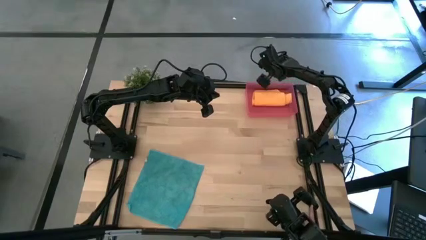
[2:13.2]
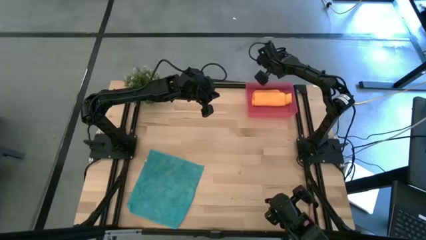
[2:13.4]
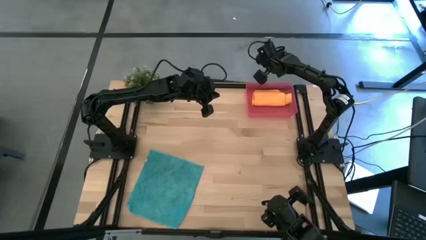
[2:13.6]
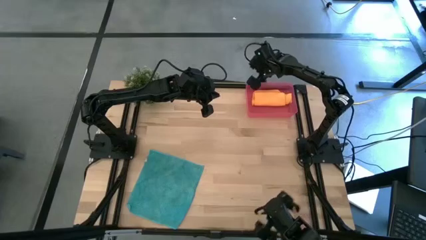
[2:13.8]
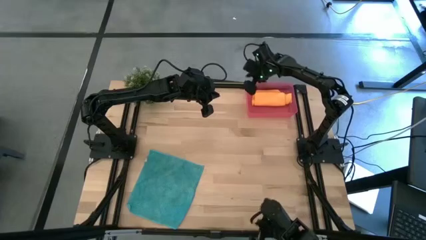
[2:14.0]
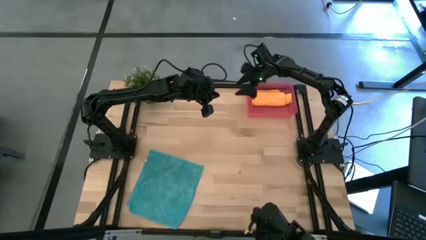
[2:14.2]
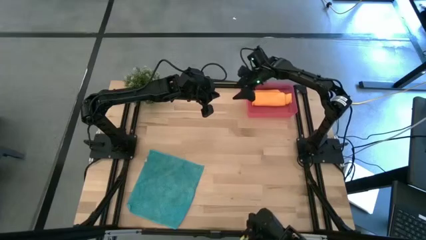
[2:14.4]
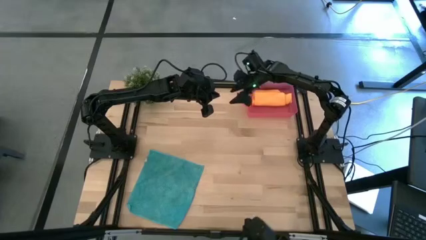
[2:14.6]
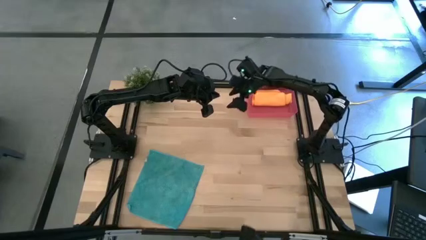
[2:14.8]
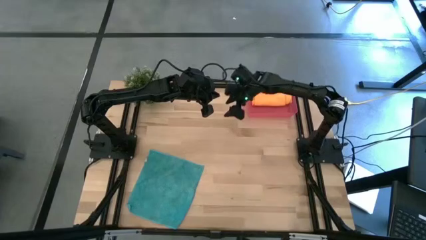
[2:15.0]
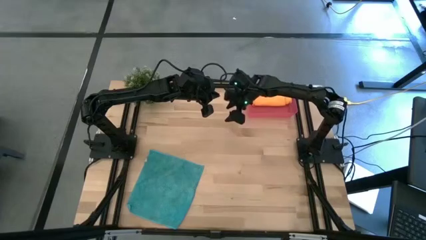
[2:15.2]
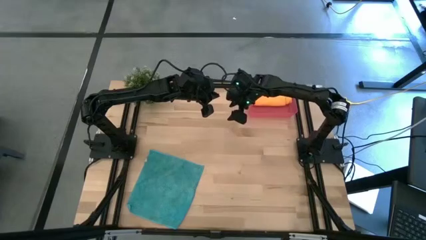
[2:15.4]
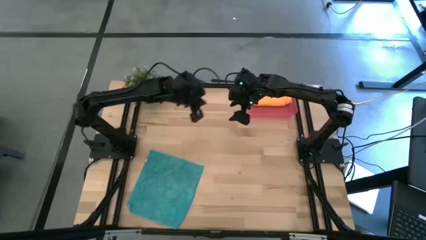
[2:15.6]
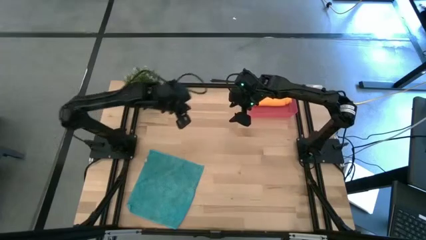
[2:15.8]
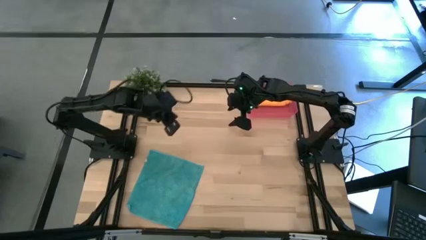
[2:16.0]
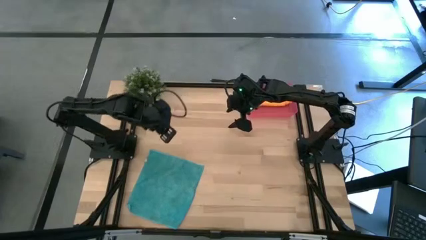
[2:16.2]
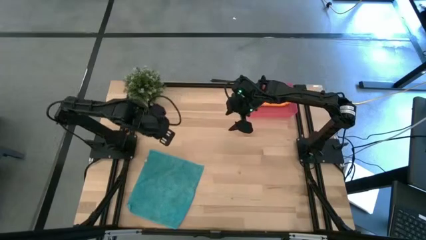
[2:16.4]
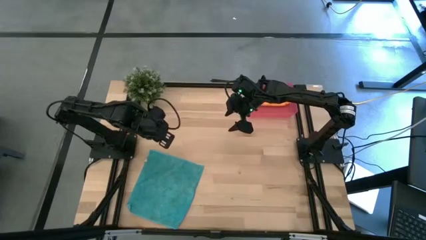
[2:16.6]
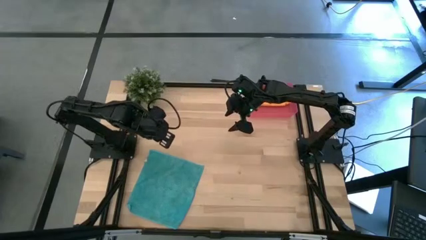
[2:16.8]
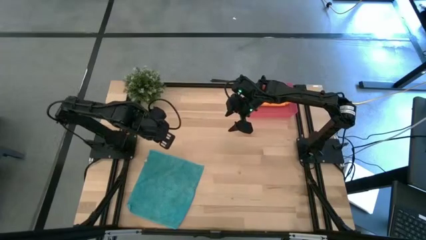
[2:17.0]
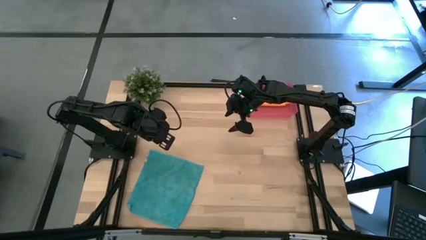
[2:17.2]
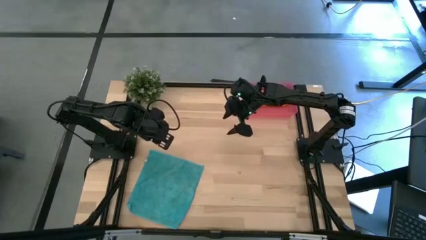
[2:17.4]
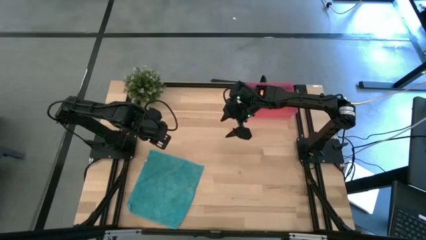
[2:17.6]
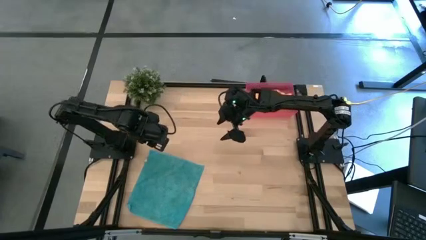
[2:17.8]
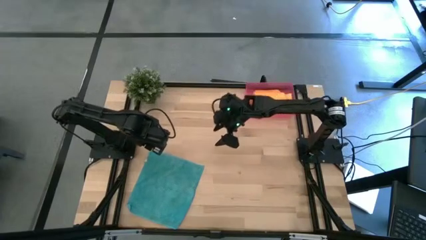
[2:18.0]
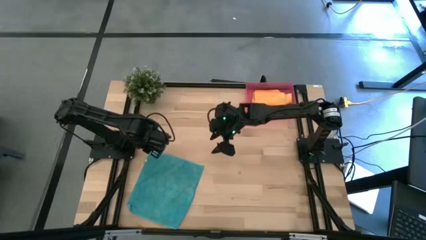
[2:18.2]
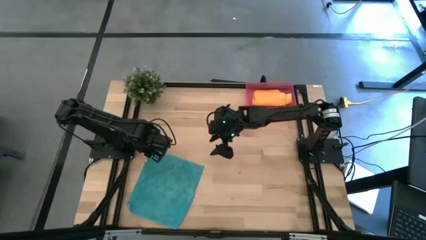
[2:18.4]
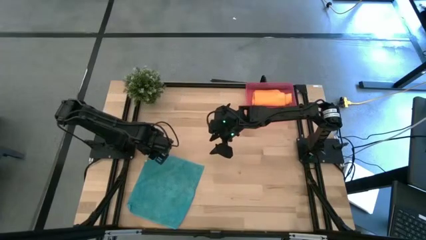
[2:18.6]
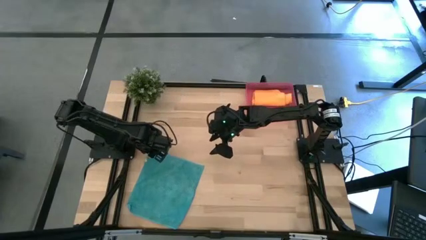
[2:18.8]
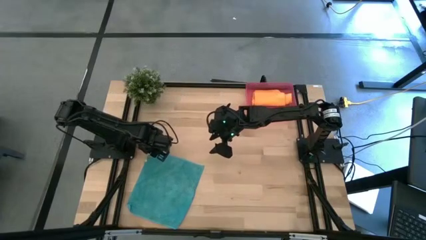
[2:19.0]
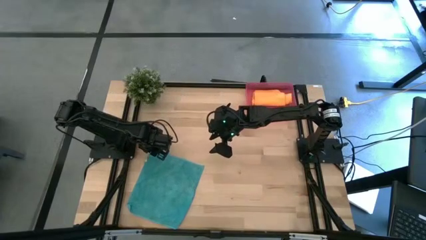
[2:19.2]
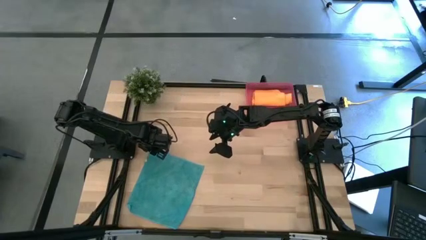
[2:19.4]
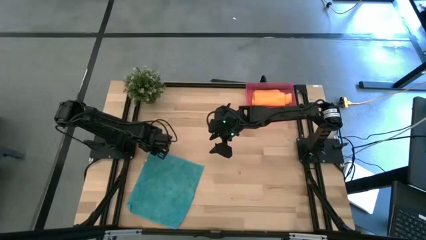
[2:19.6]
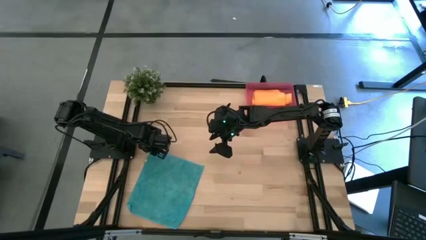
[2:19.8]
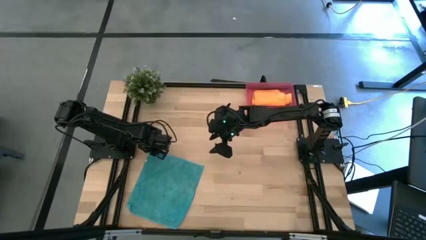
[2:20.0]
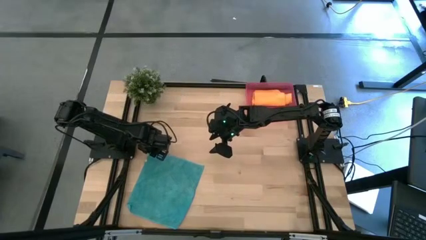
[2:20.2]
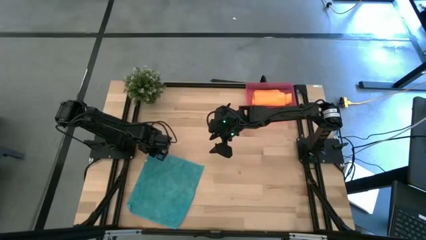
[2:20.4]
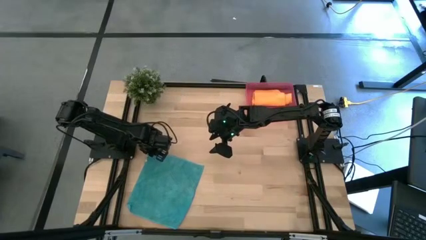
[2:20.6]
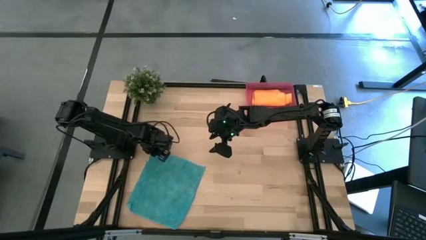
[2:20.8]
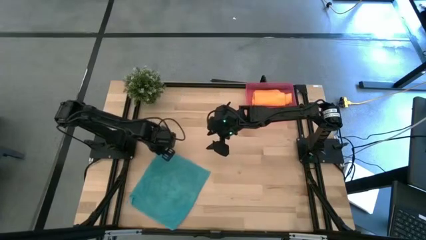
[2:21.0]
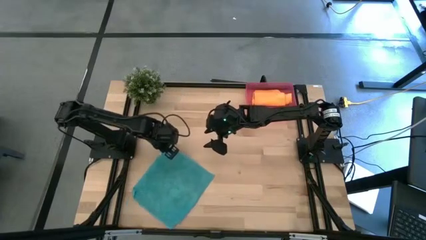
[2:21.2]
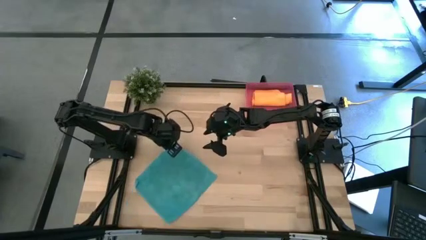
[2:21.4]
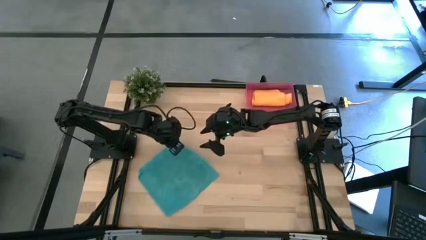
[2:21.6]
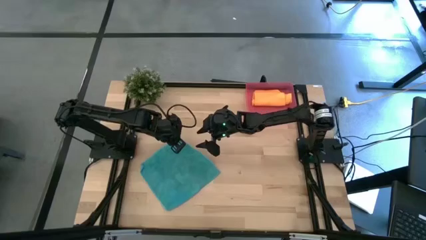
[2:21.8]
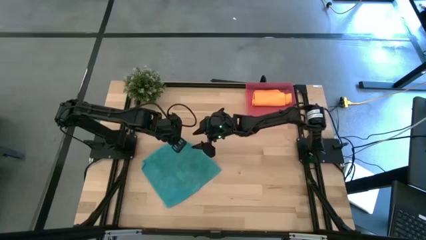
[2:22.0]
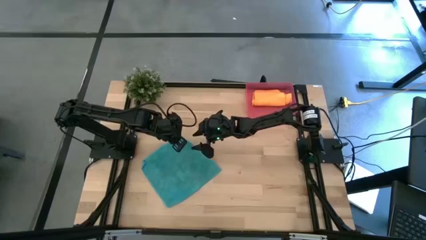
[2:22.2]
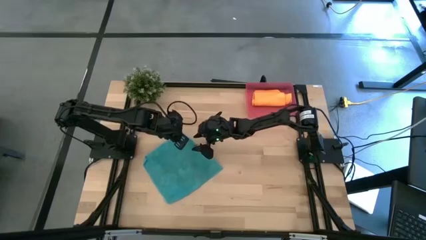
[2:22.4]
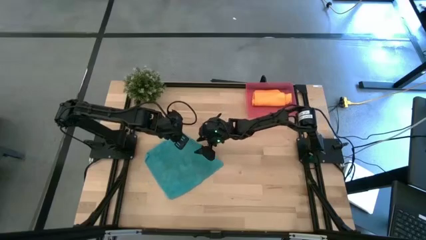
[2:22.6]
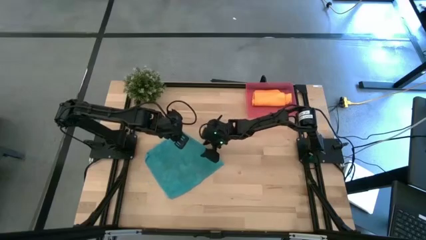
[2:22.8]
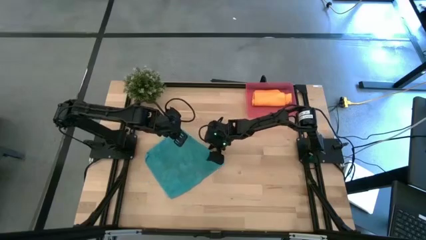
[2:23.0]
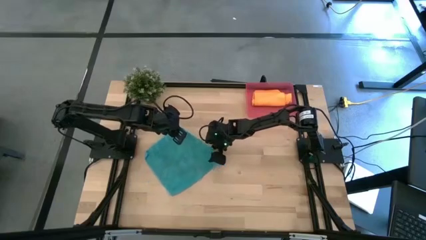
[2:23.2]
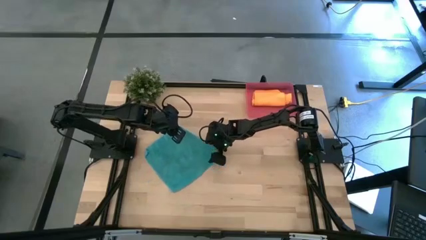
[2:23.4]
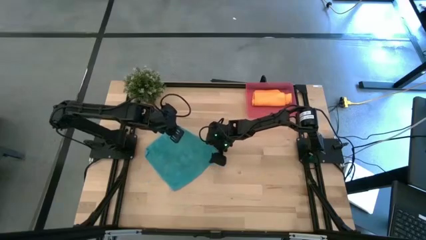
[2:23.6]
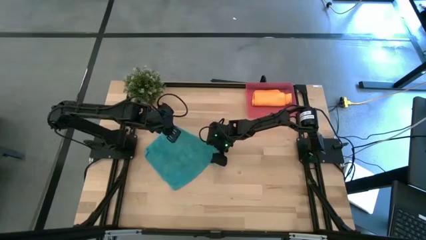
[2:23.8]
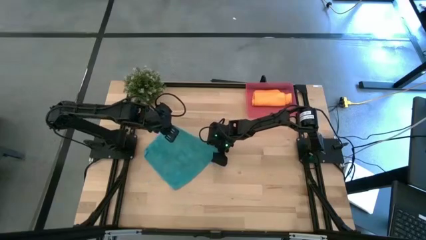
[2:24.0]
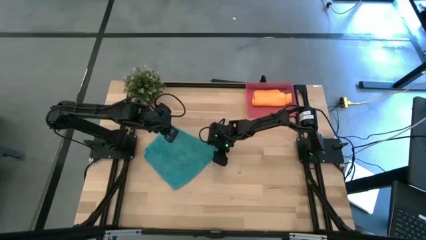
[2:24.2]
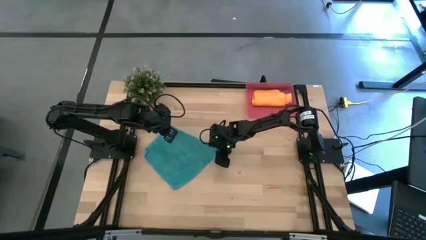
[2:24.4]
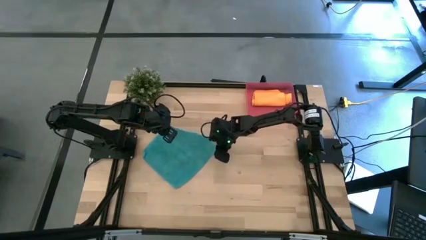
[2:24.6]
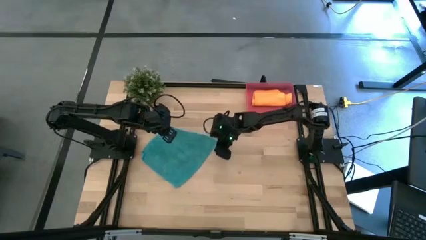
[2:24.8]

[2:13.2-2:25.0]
Task: Roll microfiber towels into tight, uniform cylinder then place into a basket
Fold the blue microfiber towel

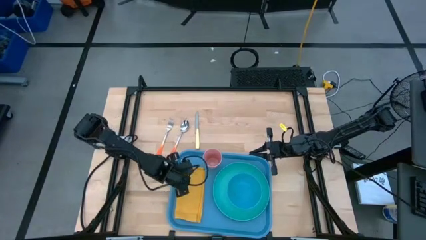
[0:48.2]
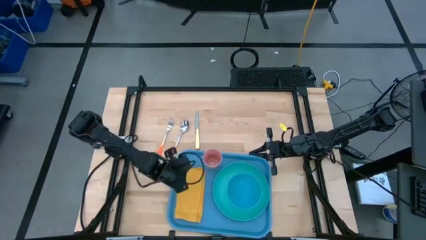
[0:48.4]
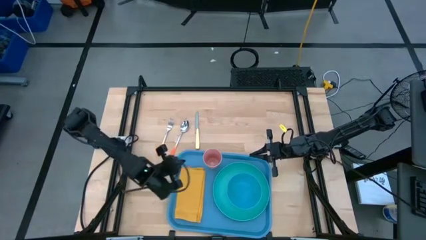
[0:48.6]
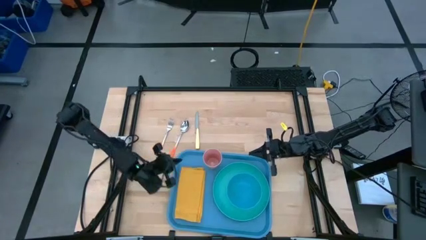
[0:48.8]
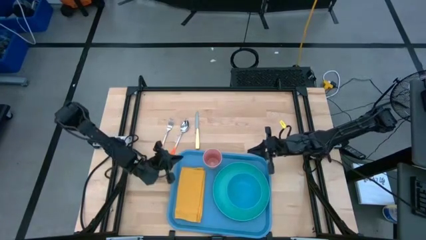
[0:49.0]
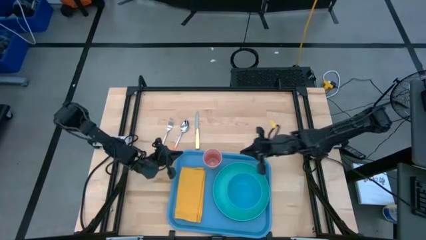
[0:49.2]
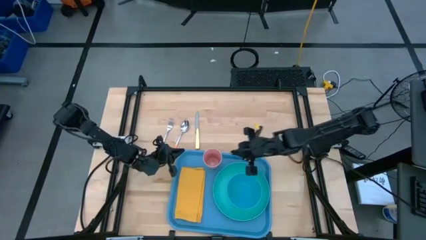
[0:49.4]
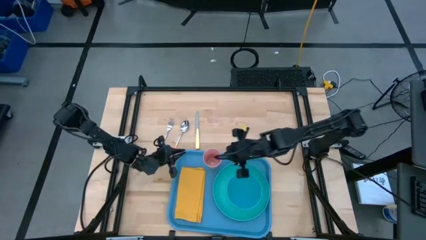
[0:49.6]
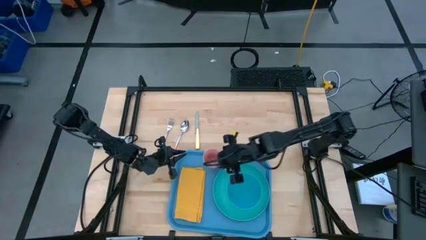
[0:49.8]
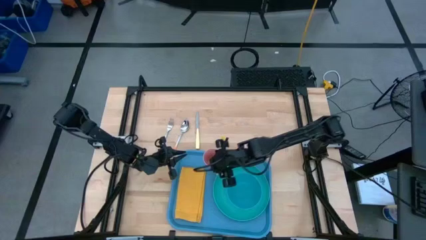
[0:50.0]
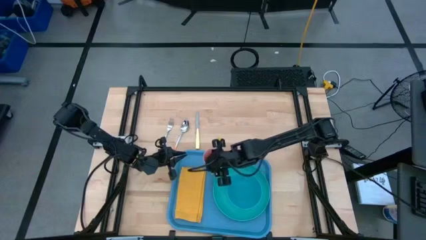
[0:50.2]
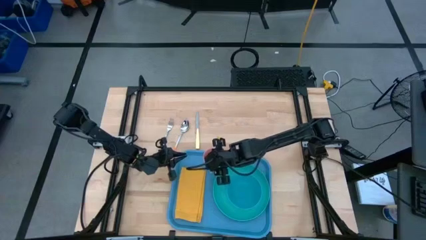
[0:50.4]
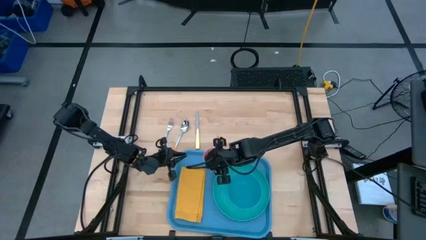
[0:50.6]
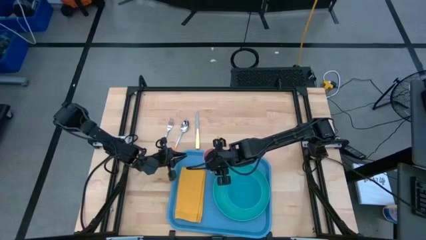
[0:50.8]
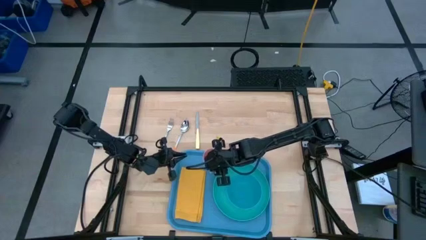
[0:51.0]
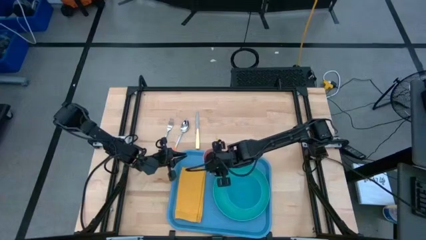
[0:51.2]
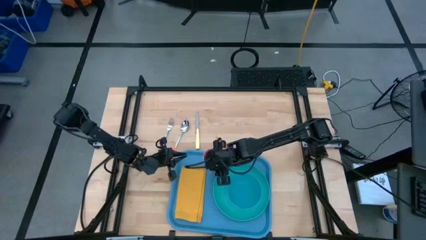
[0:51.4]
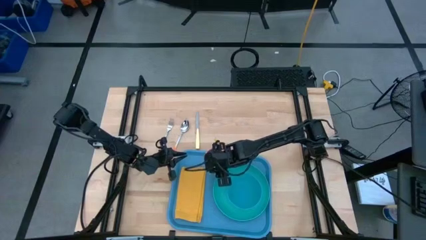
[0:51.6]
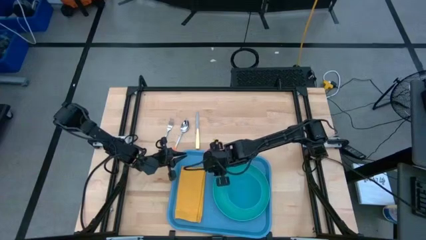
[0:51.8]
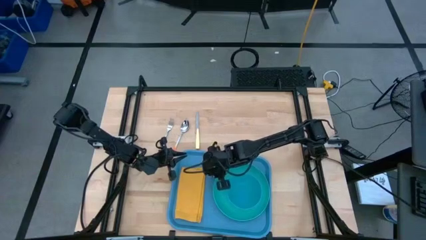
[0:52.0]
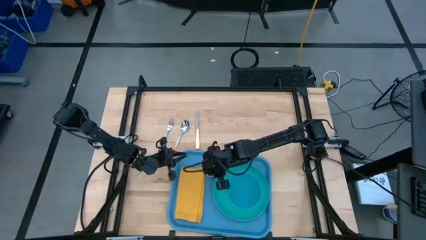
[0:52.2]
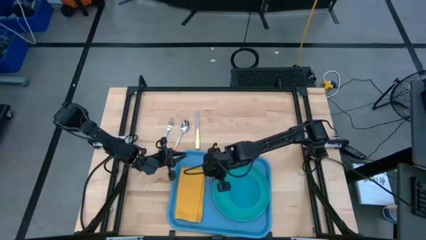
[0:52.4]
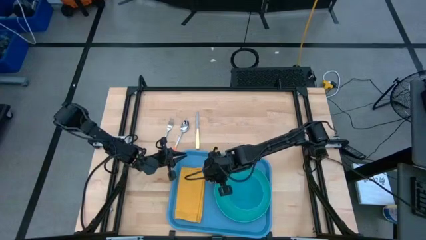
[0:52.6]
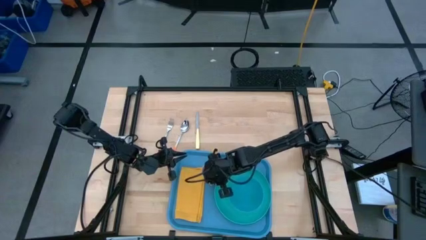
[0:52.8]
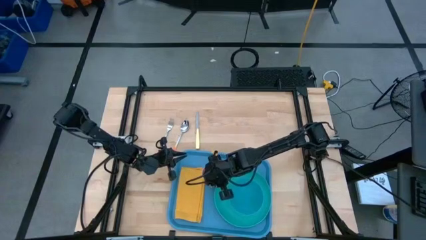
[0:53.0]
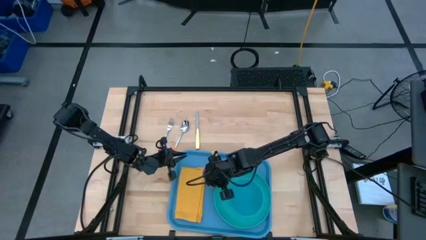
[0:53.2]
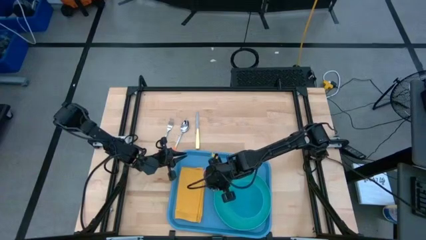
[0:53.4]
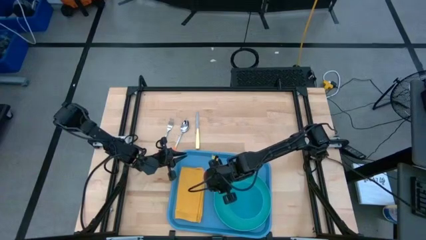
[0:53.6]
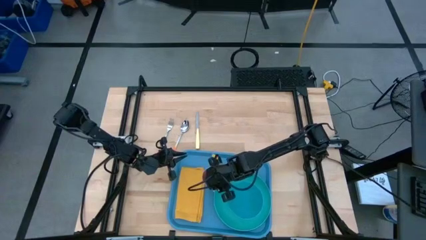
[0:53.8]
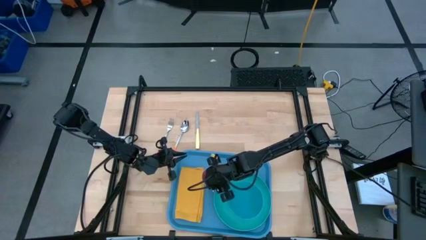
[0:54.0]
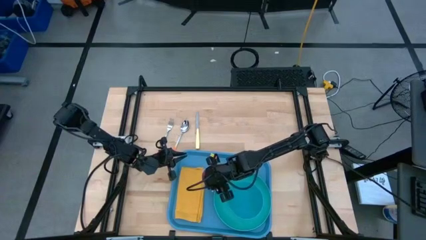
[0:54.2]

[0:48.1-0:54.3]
Task: Set up tray
Adjust the pink cup on the blue serving tray
